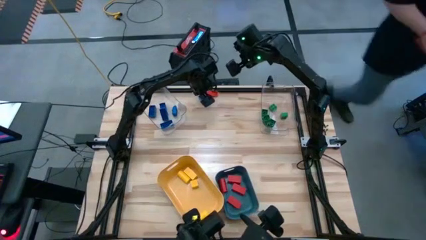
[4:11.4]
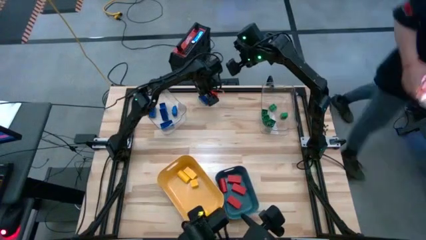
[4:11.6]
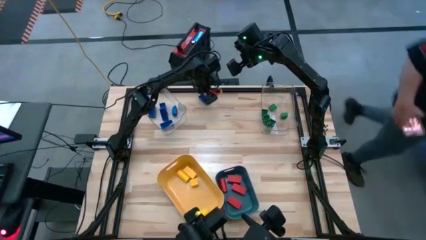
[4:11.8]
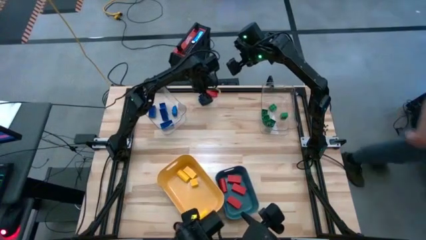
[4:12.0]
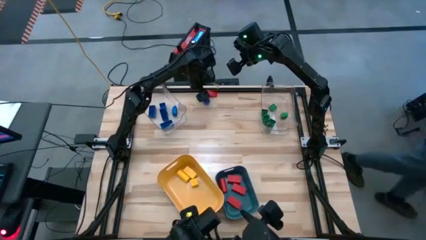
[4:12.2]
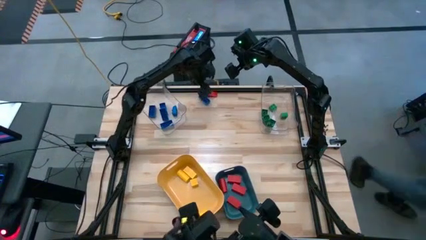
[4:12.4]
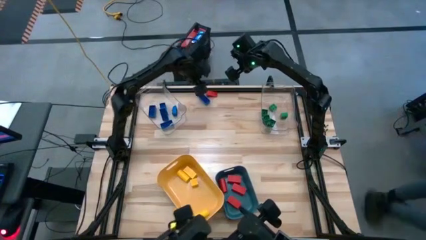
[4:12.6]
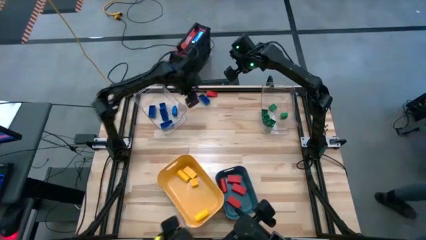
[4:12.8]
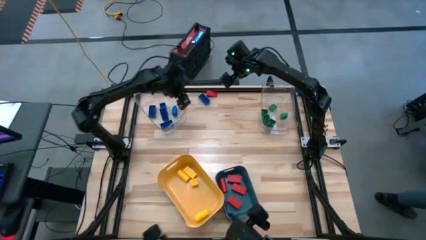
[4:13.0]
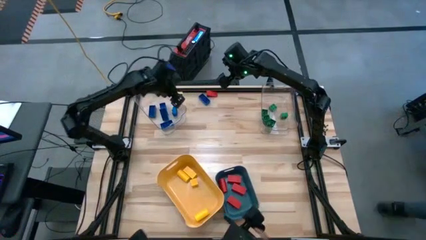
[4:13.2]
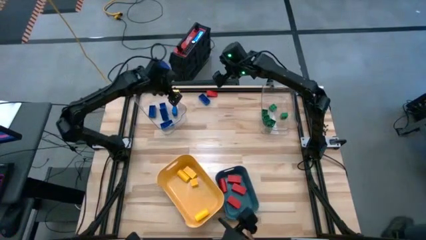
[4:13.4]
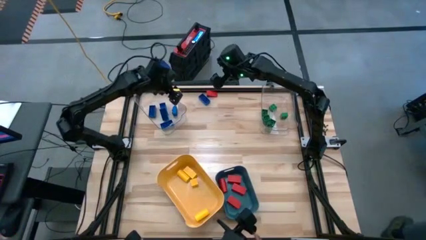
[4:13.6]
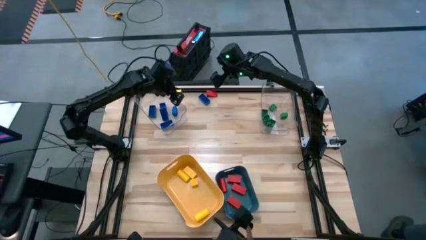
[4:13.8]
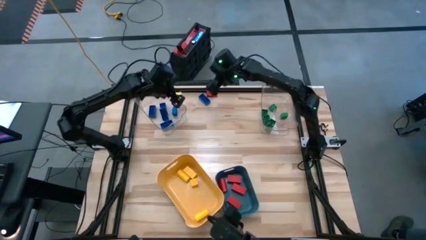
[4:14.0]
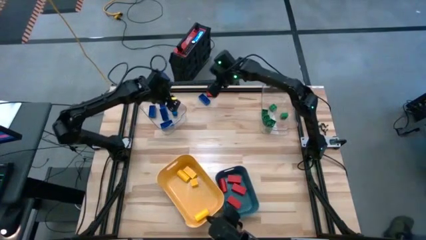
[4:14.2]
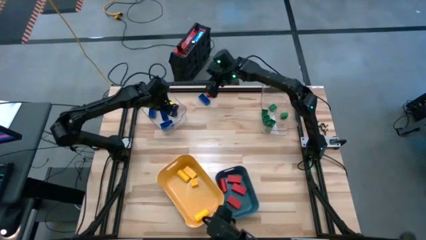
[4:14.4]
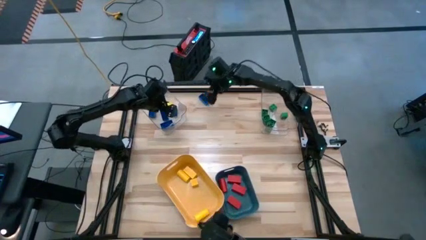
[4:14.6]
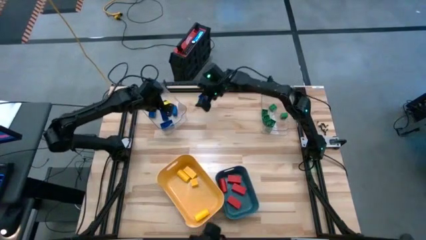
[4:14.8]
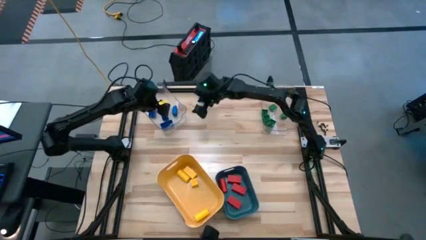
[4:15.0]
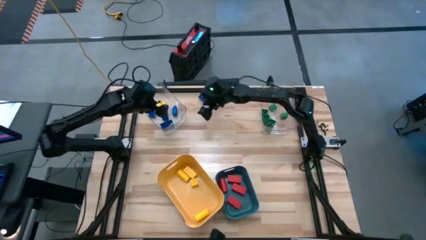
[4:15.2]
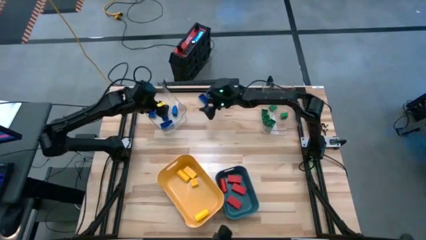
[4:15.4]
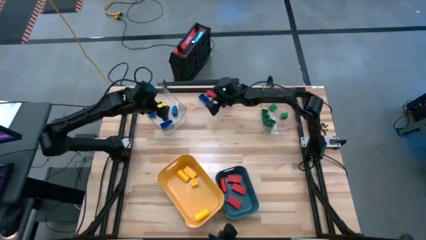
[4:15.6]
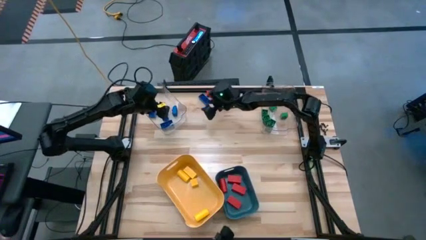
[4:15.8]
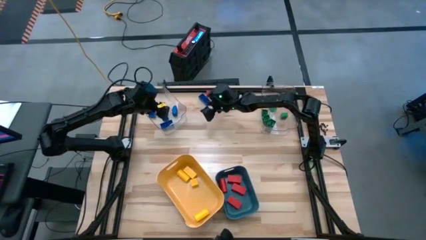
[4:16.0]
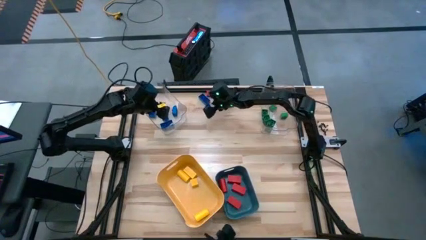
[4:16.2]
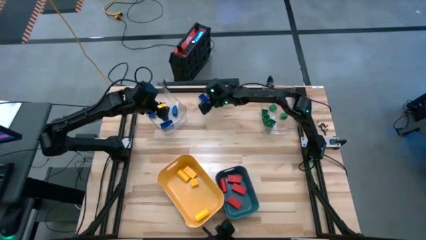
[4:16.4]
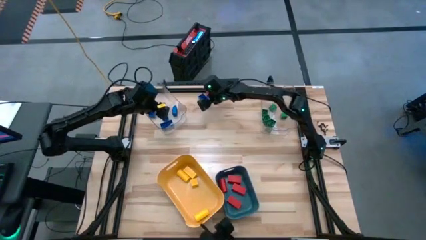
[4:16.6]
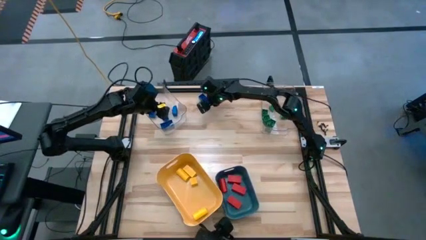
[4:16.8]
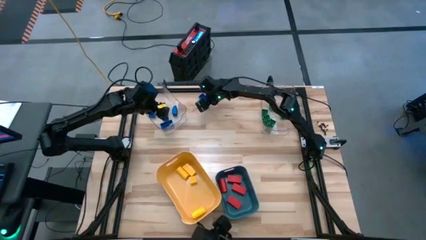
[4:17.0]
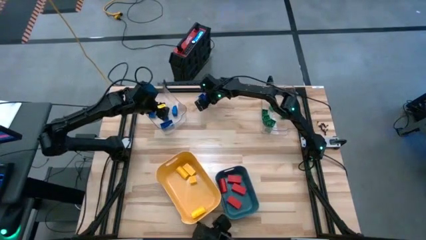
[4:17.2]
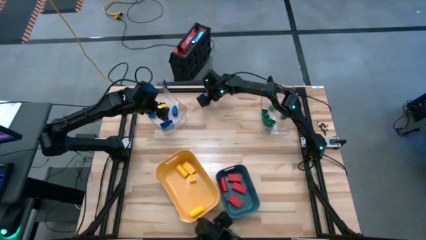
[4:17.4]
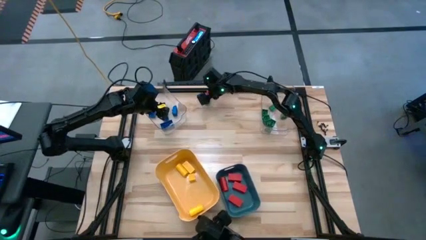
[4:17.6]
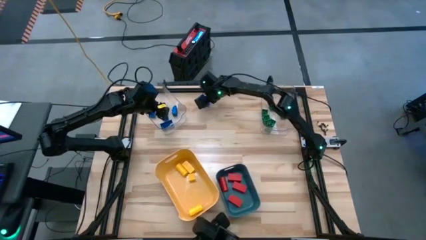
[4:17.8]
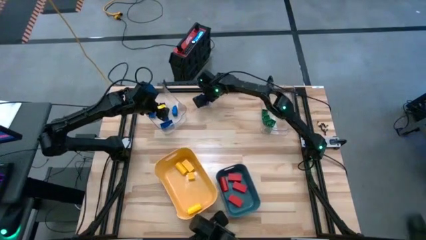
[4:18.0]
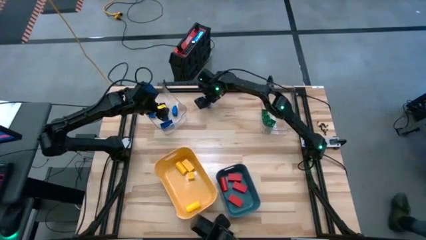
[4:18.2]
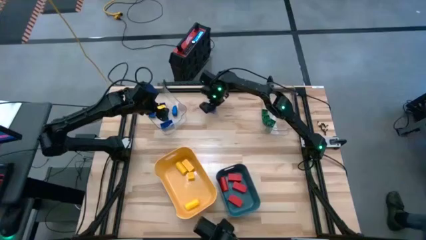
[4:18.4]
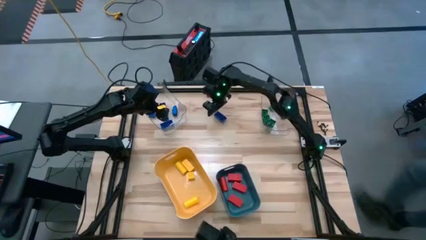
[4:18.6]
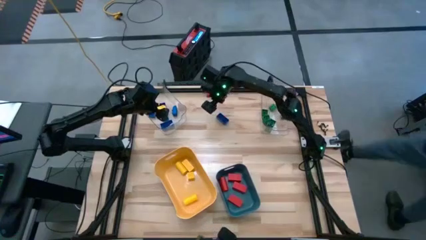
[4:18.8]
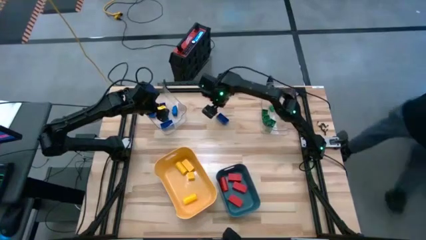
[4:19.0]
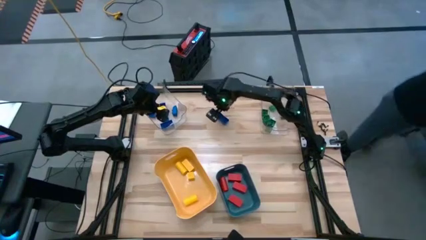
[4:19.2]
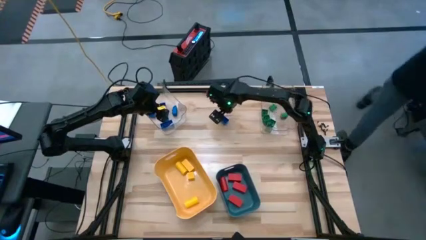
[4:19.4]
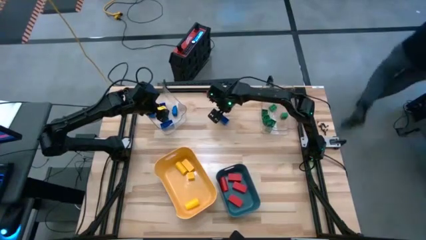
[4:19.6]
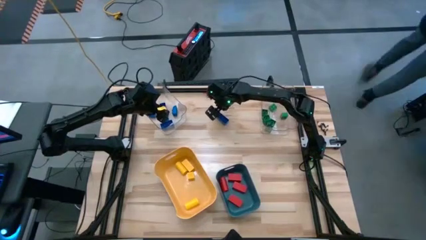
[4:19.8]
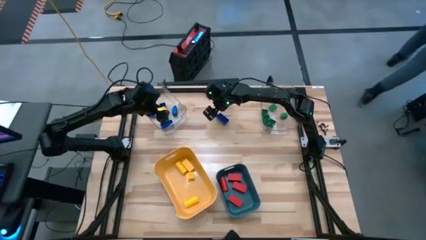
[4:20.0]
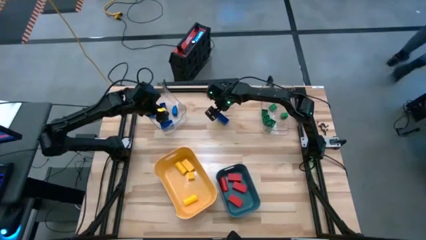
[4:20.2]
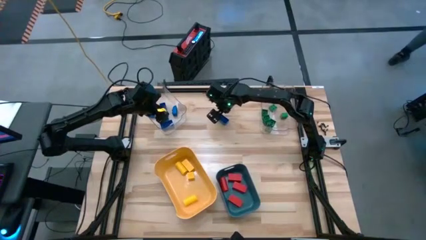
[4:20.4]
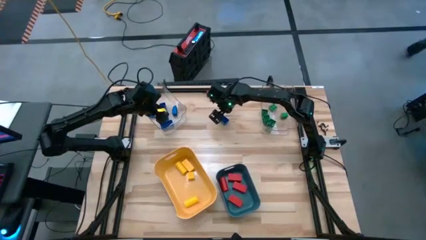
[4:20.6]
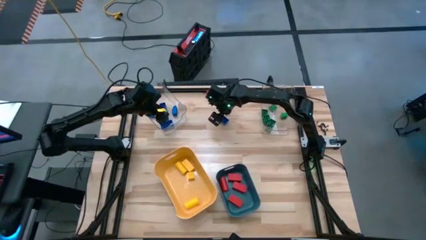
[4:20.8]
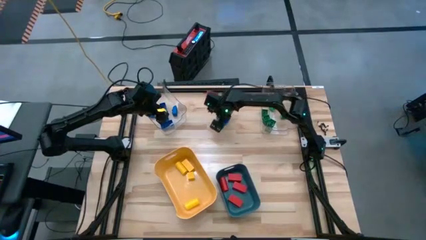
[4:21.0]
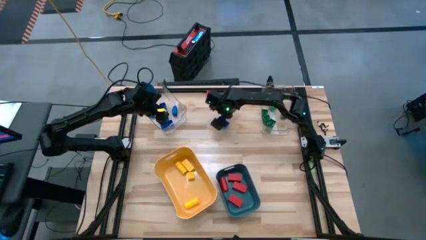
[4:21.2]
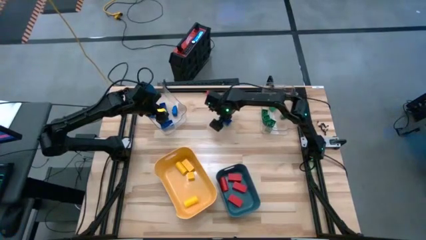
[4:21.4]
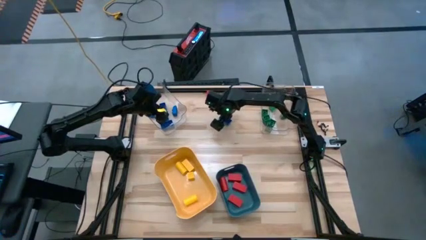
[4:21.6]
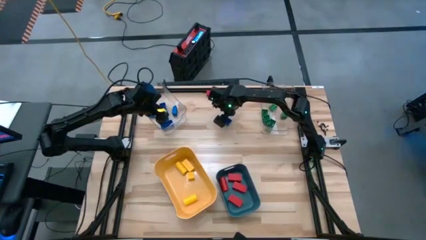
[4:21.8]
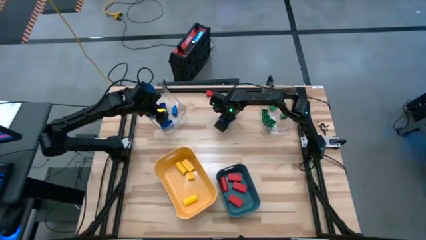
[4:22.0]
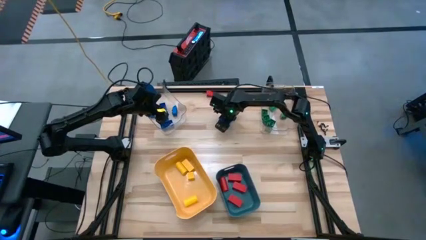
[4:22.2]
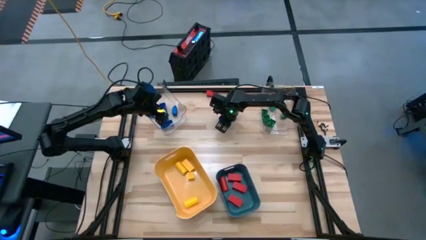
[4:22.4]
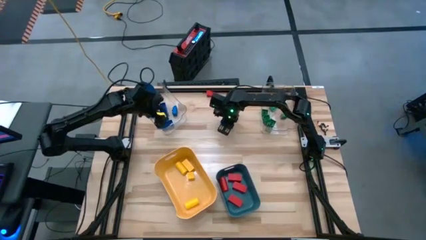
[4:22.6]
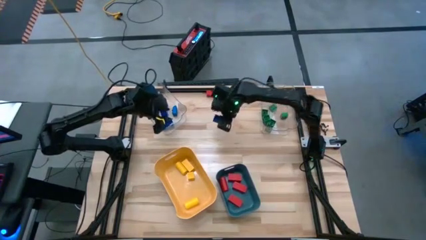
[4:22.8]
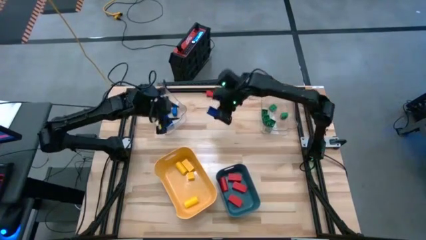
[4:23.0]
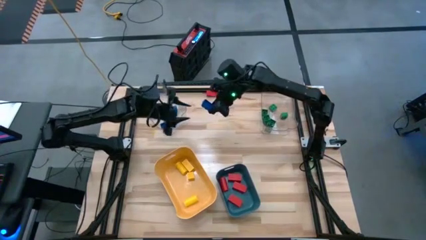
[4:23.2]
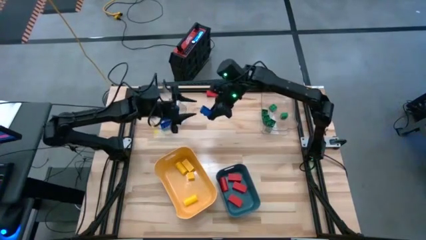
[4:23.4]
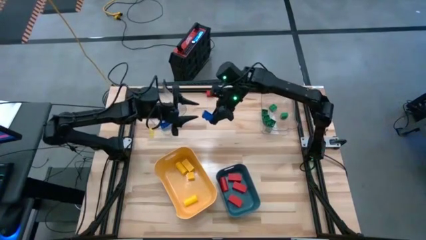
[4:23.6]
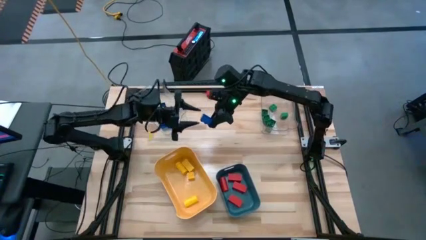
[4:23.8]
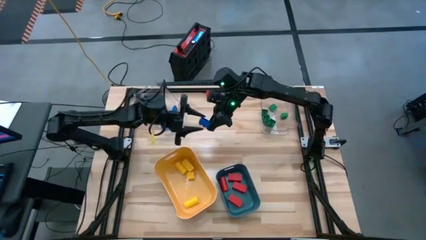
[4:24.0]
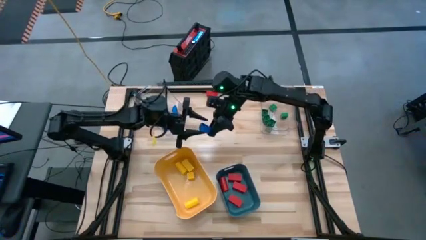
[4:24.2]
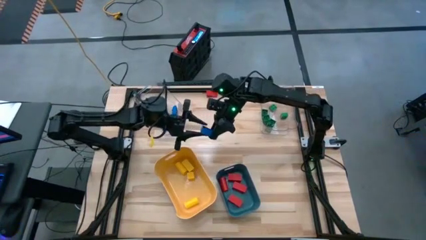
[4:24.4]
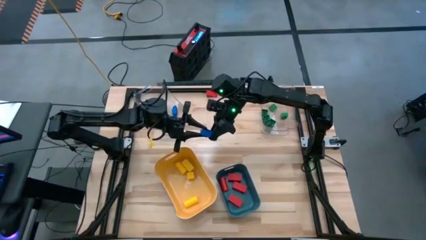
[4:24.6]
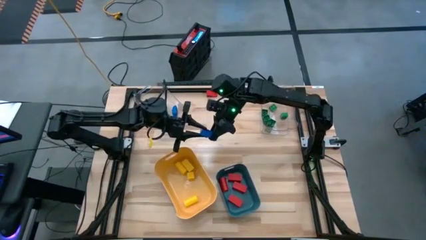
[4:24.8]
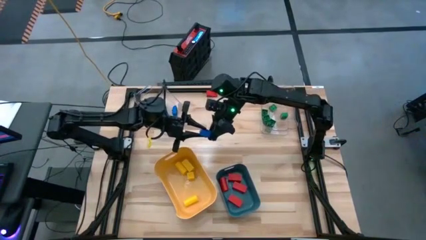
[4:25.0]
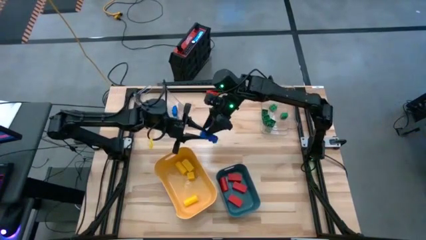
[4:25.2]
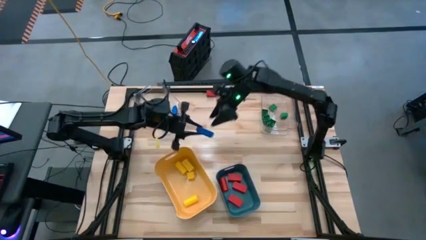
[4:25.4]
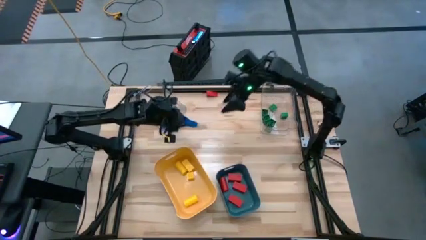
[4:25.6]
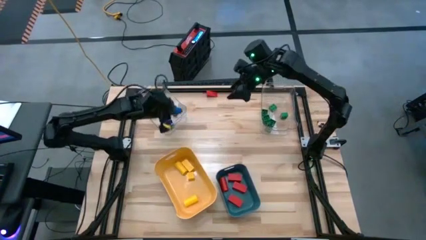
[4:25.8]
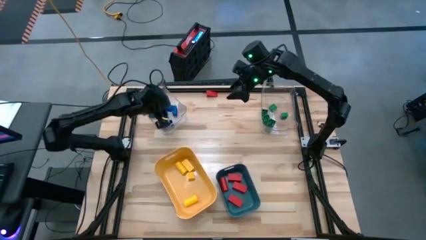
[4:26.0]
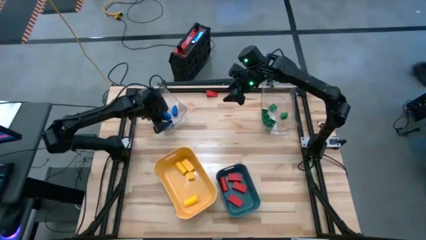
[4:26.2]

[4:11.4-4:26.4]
Task: Sort blocks
Put the blue game piece into the left transparent bin

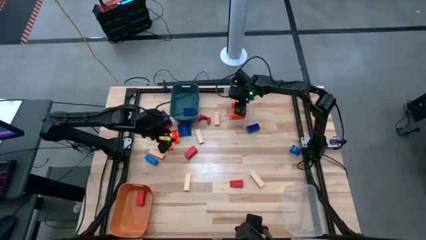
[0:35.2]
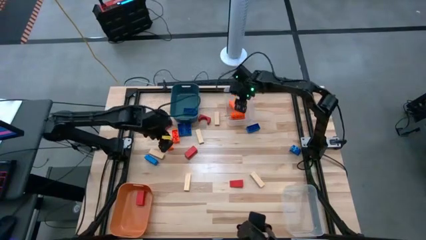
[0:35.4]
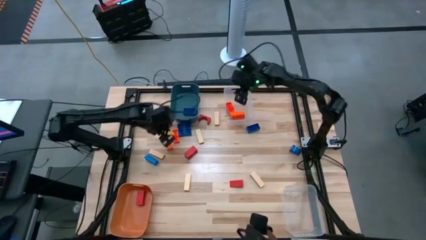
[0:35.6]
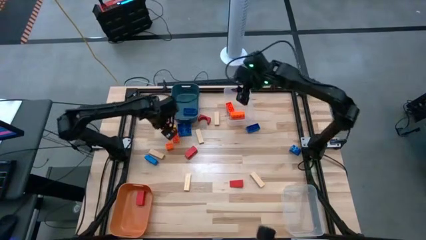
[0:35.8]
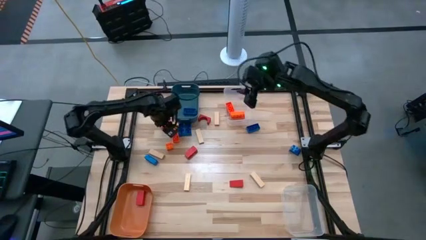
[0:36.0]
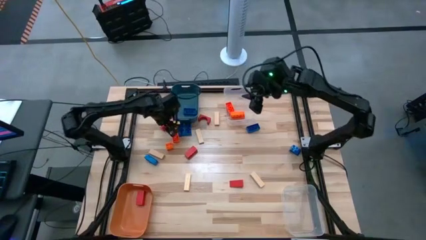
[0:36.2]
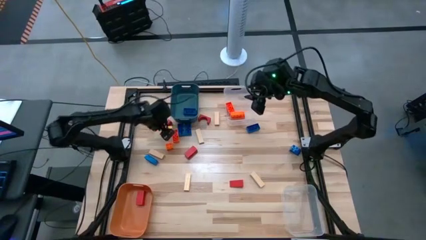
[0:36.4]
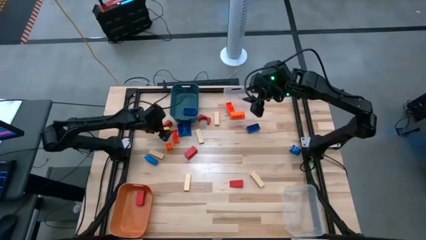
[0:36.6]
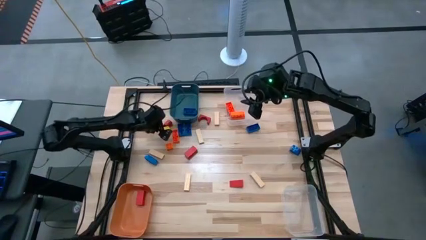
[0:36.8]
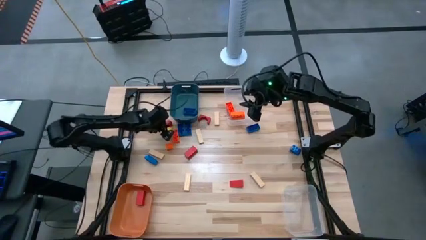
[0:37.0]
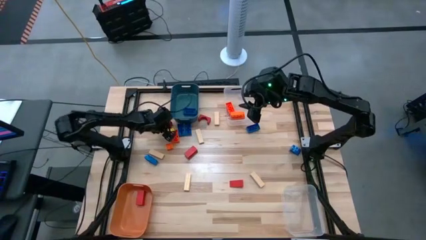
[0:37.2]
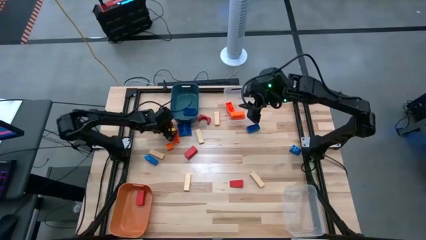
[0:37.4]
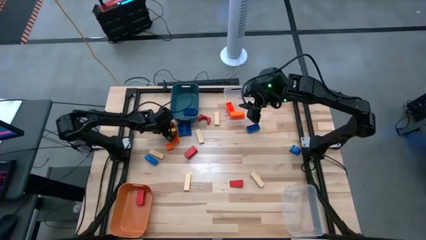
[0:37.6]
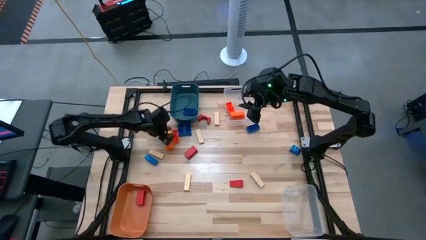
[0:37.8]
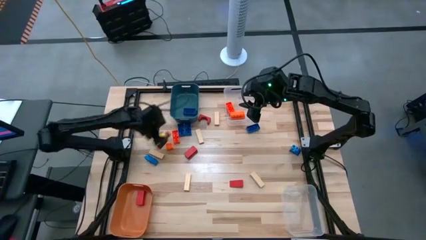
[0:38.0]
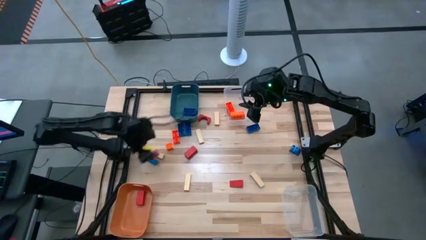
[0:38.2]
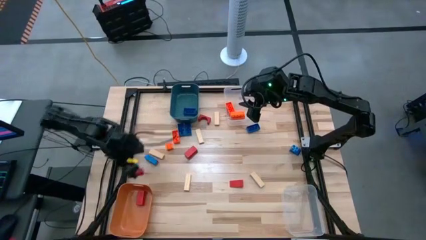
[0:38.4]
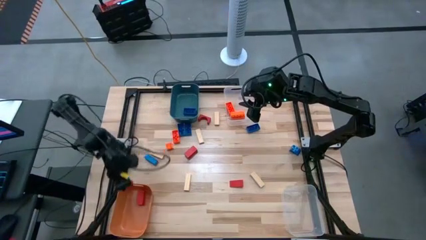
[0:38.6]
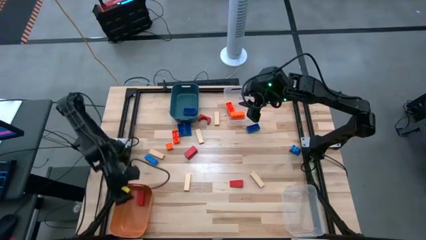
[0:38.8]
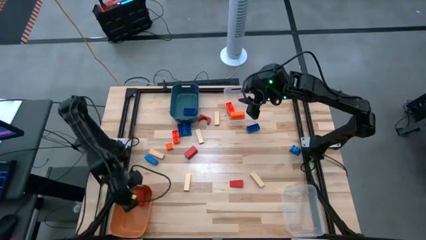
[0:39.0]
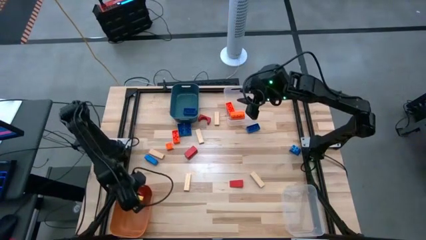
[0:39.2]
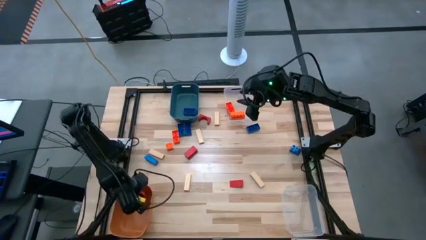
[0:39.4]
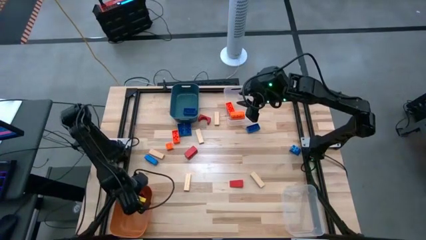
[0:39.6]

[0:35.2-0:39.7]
Task: Sort blocks
Put the red block into the orange bin
